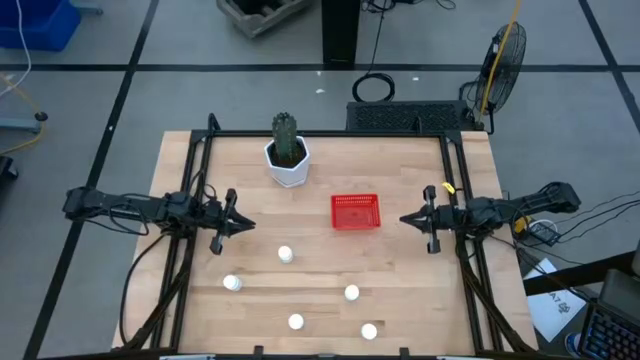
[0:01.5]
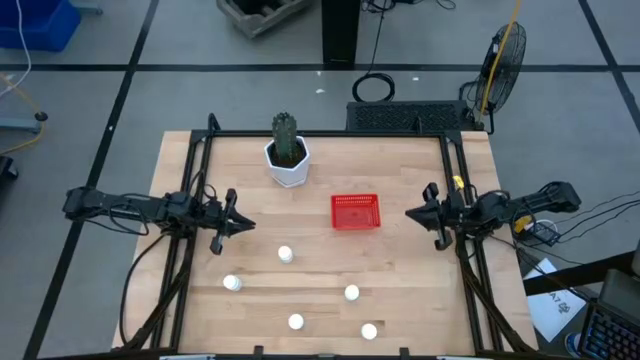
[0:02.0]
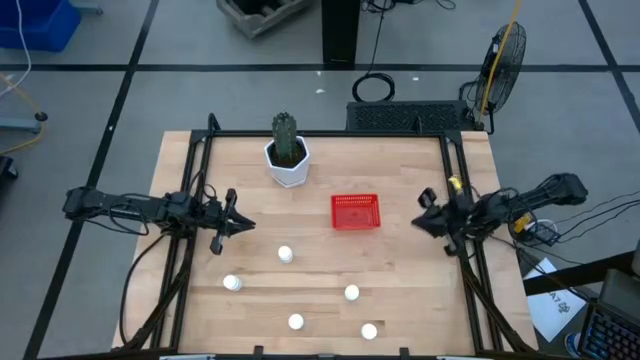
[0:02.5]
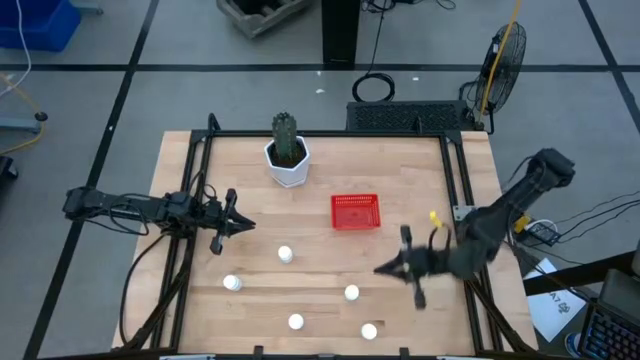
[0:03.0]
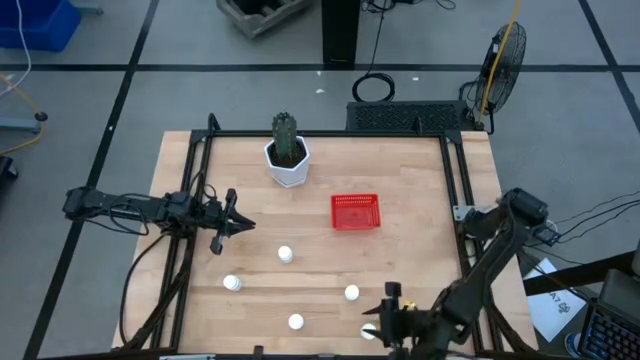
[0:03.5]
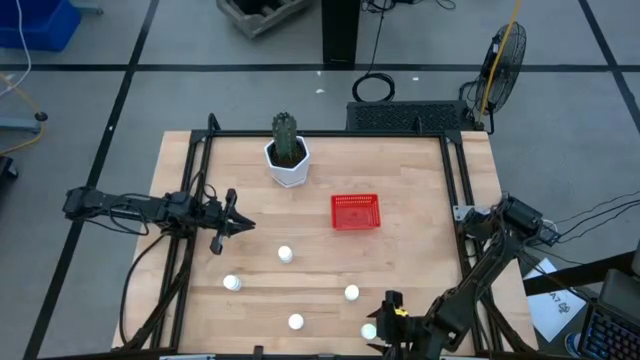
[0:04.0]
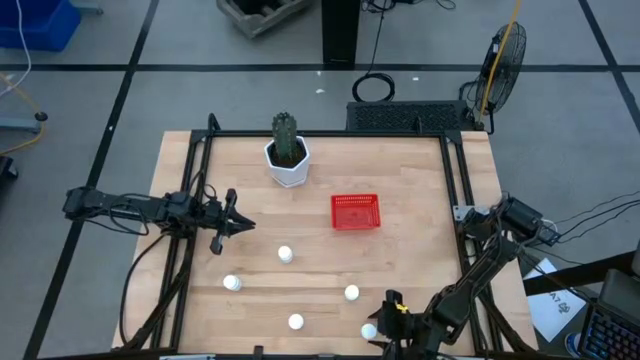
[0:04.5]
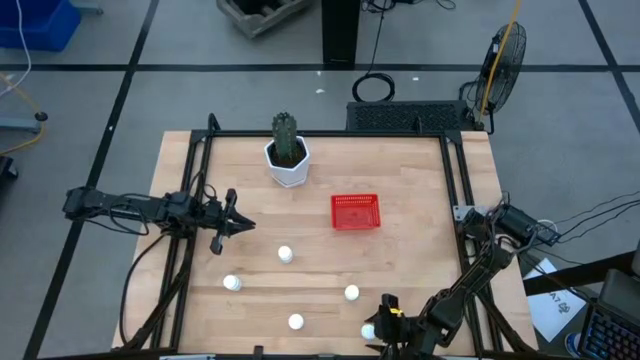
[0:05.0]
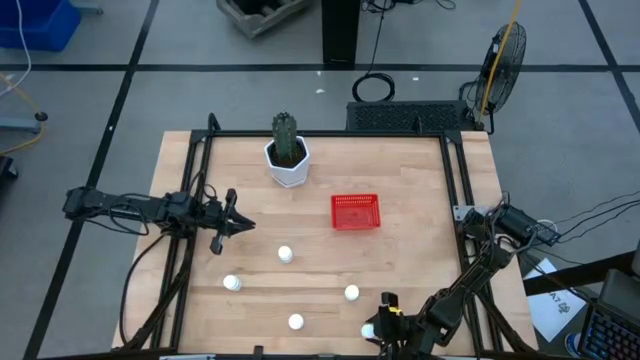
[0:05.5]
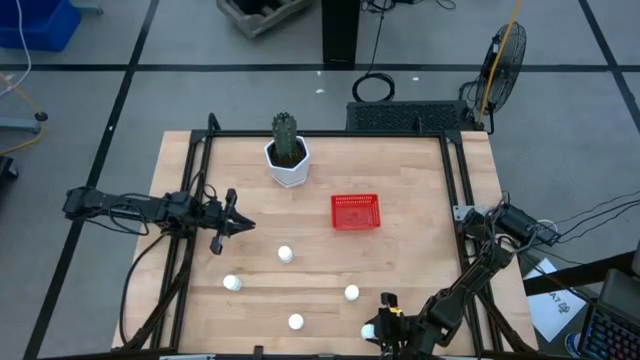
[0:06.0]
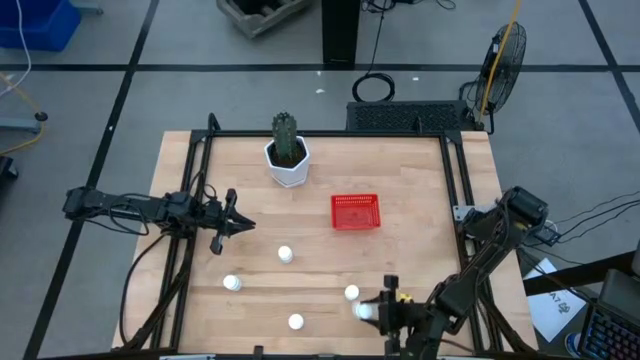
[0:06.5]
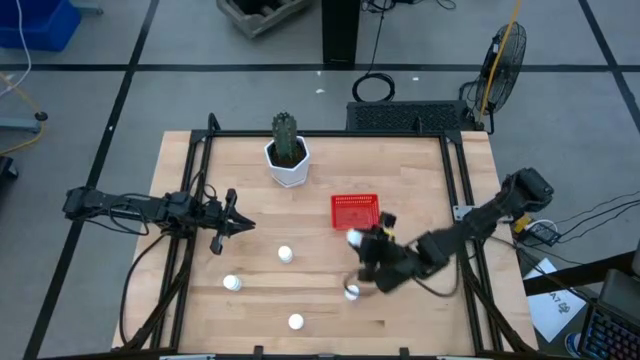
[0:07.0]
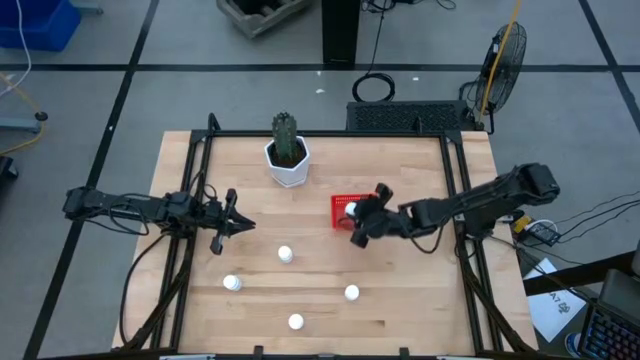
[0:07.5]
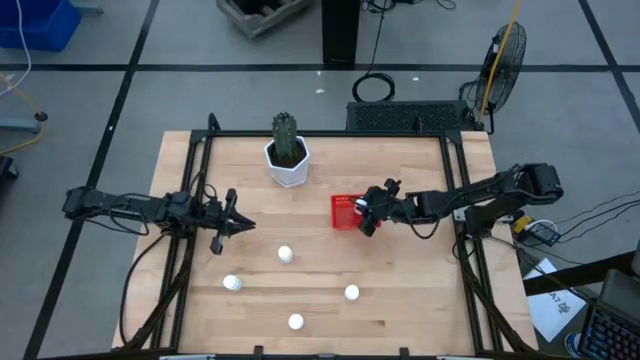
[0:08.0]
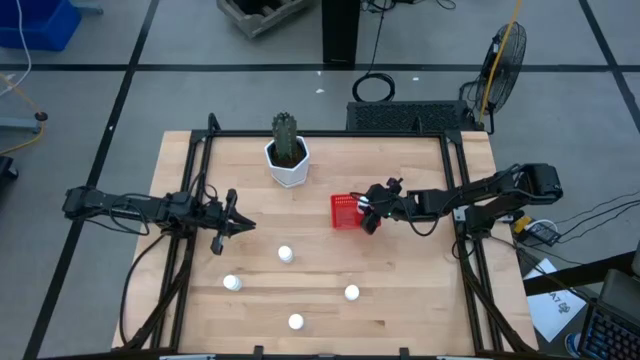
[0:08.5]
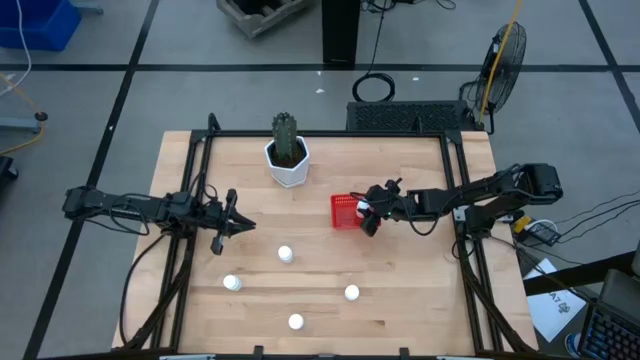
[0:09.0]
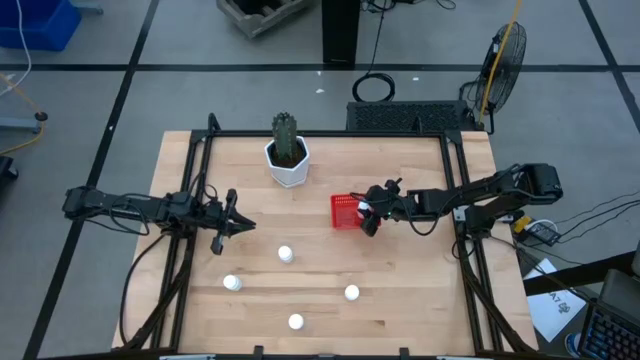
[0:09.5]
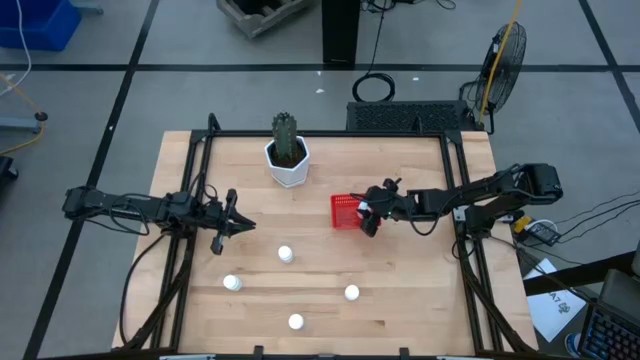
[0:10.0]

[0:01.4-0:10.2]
Task: Pick and place pill bottles into a basket
Put the white pill bottle into the red bin

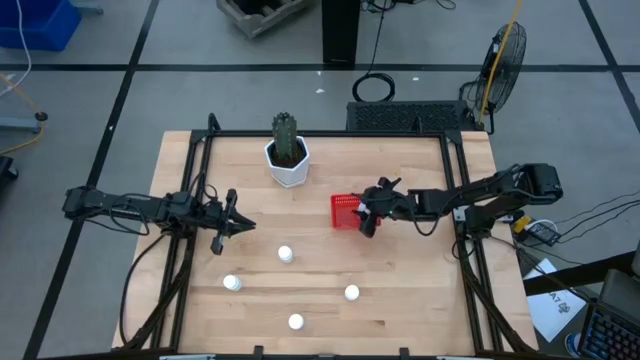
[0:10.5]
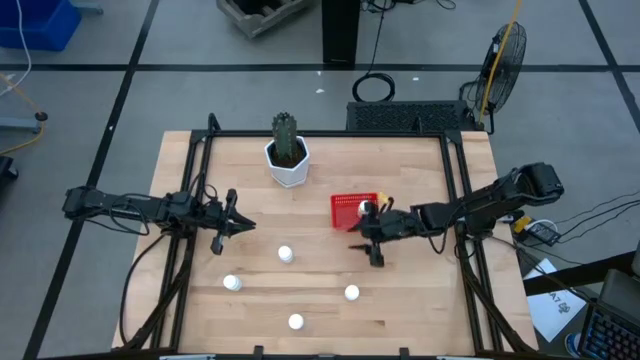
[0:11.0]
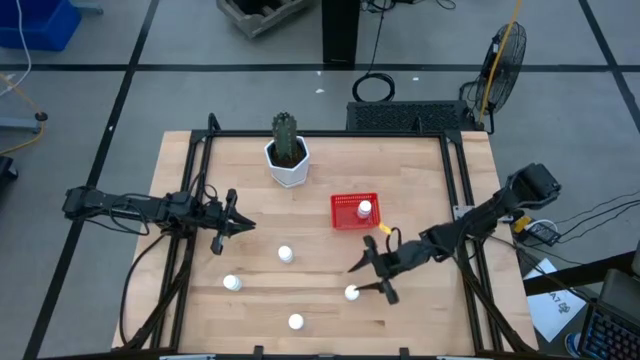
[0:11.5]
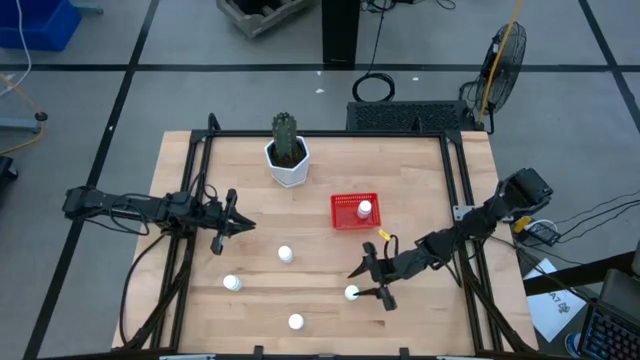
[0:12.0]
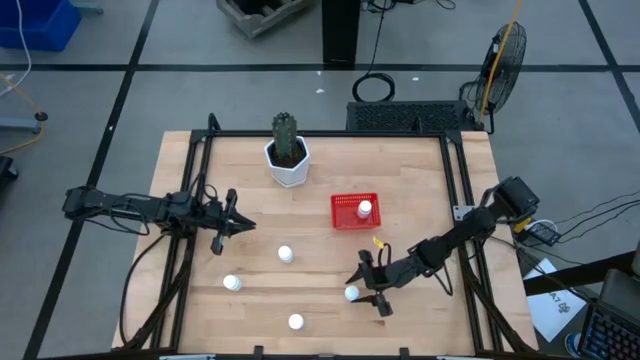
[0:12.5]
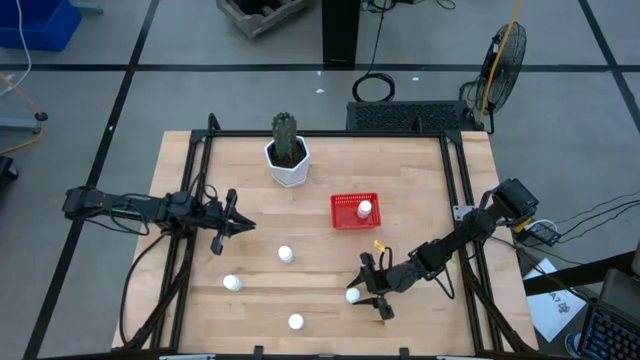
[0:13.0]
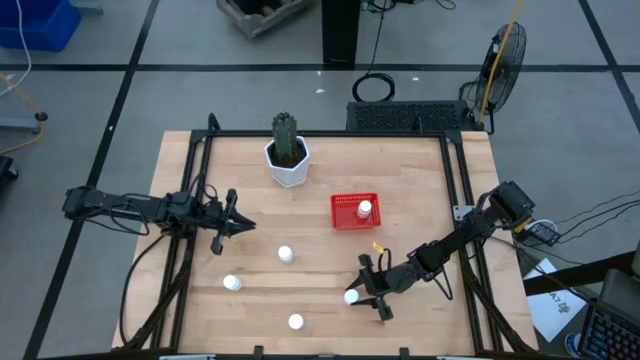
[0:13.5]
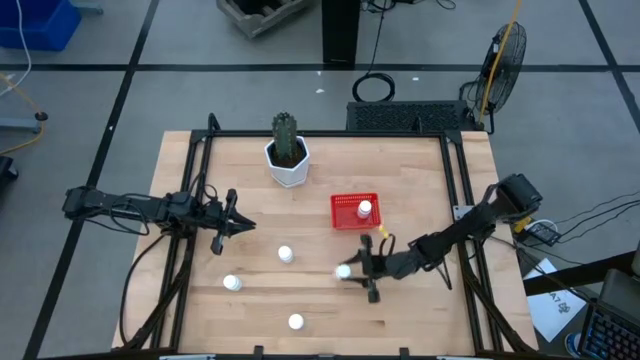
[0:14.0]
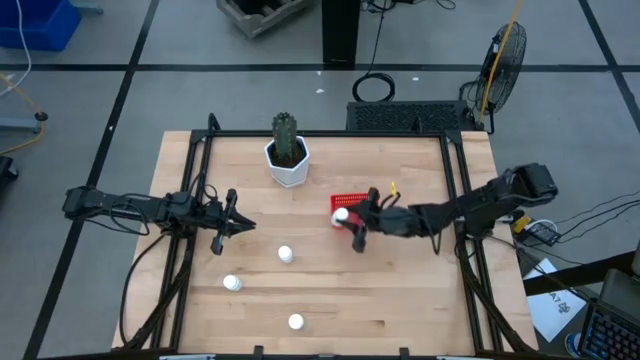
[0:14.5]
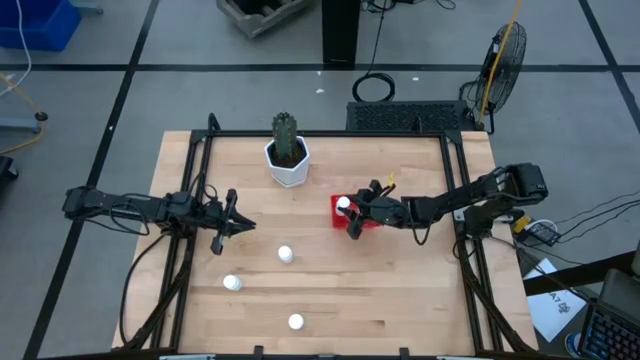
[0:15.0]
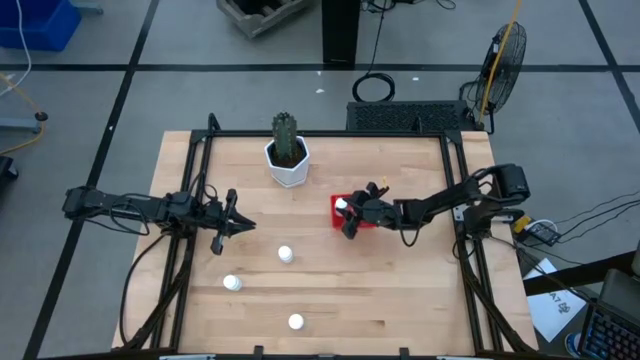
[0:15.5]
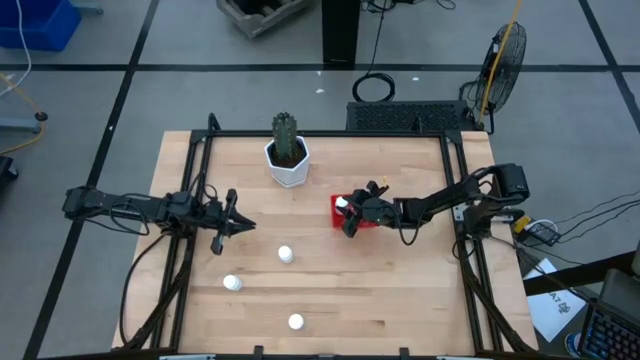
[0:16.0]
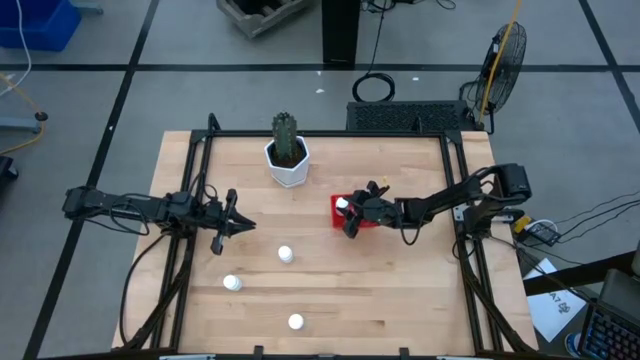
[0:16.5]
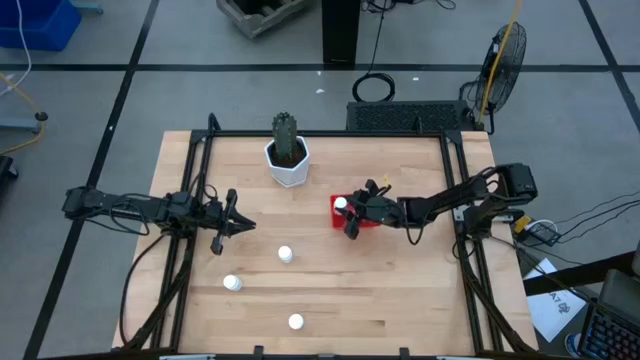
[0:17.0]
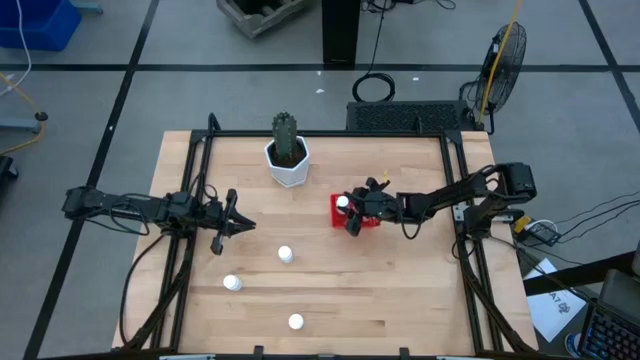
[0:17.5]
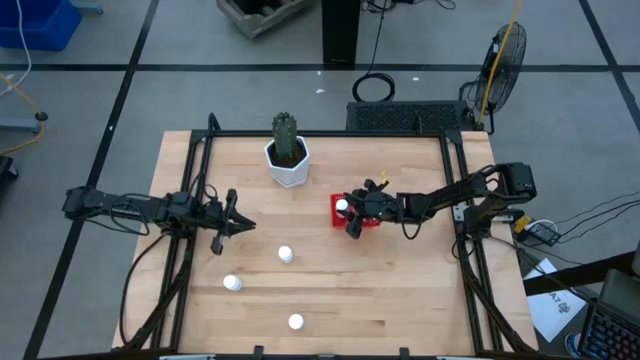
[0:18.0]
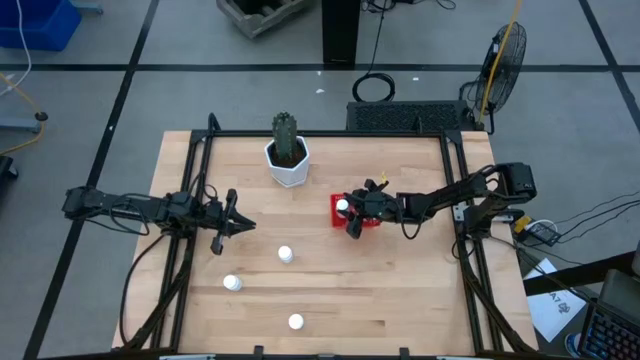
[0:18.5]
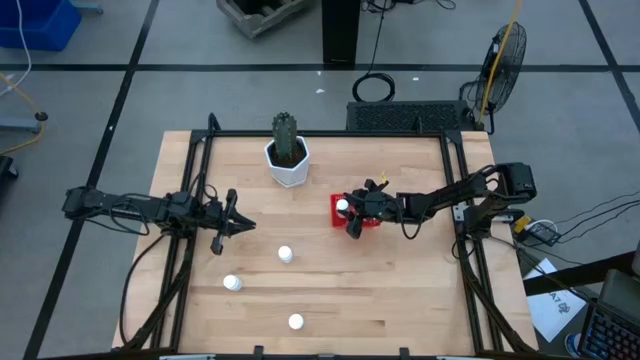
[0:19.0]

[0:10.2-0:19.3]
Put the white pill bottle into the red bin

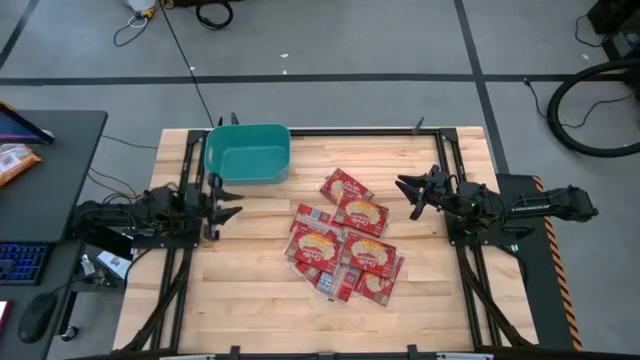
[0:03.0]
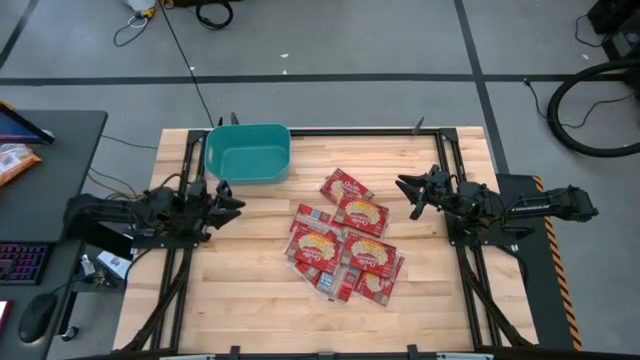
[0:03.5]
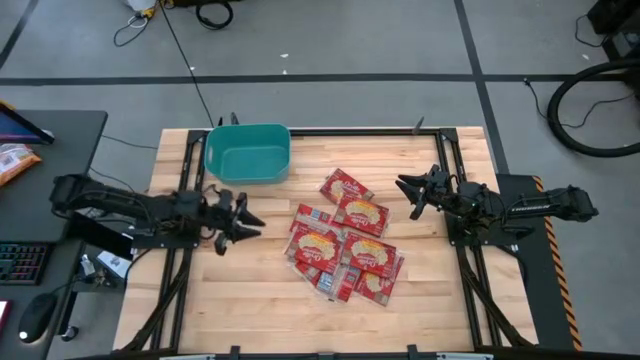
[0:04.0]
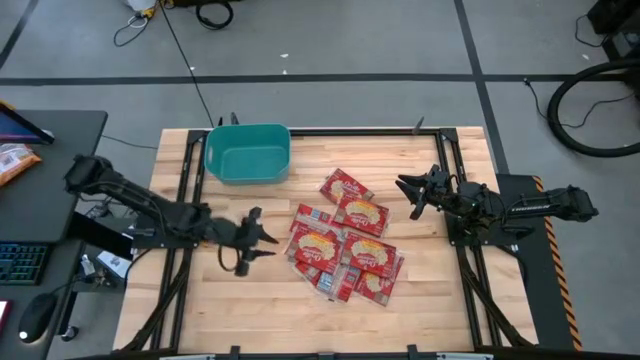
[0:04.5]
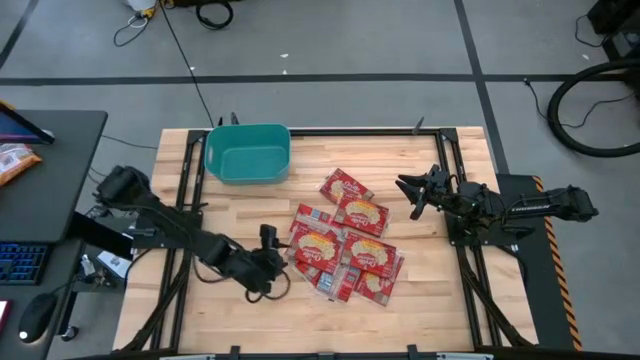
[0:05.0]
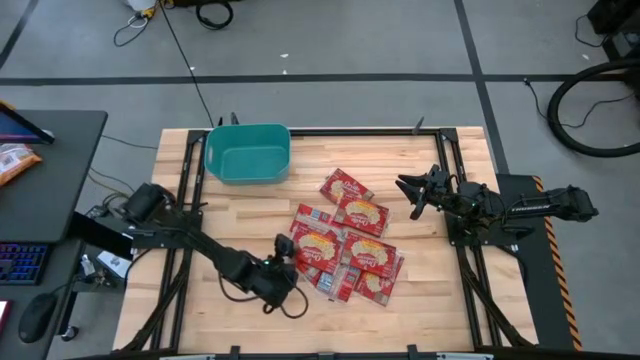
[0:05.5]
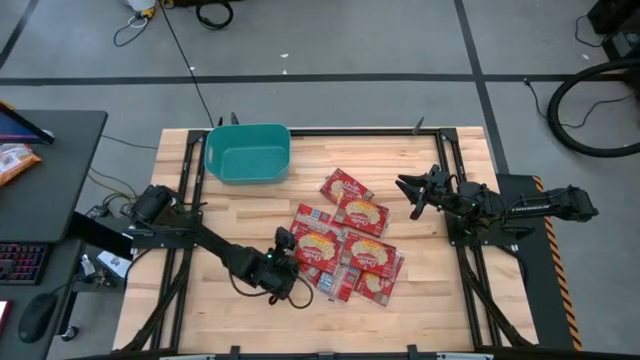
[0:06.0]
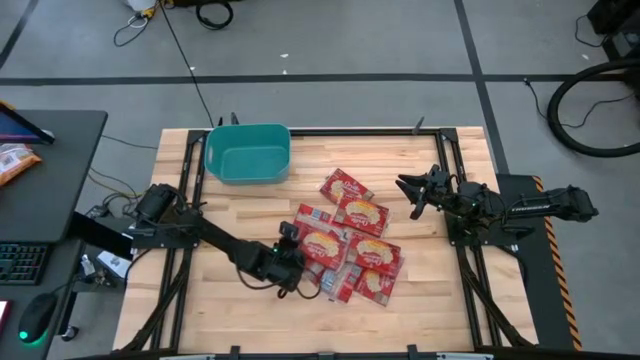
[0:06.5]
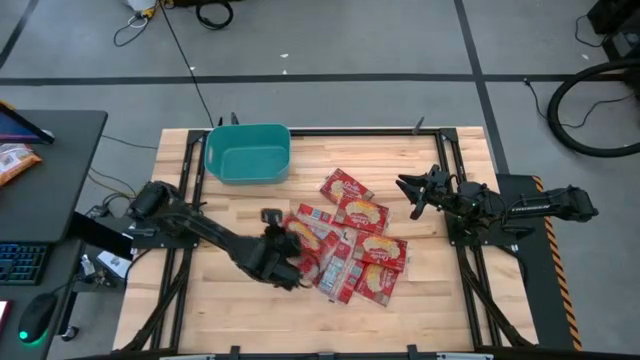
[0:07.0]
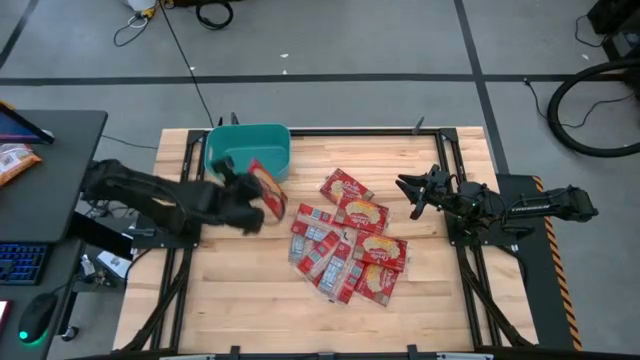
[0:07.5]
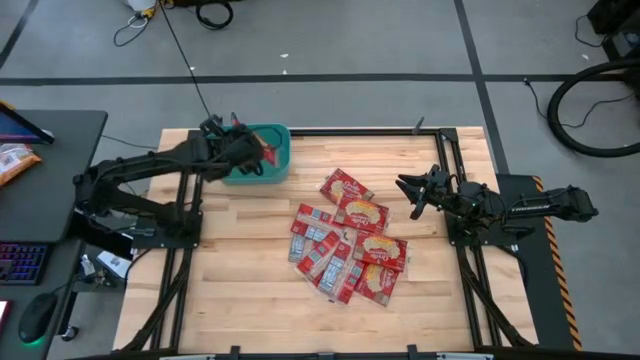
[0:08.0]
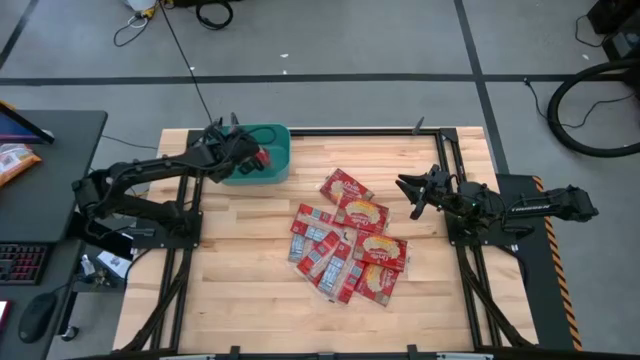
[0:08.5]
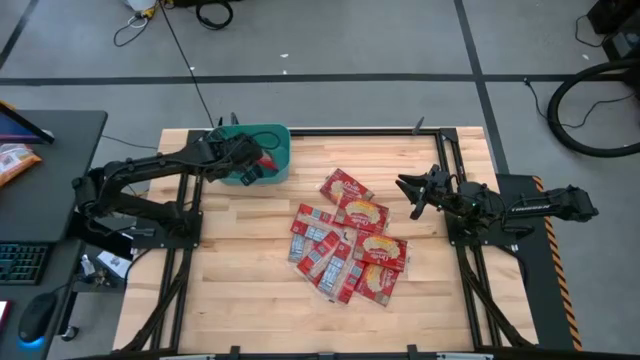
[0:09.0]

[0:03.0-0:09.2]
Task: Sort popcorn bags into baskets
Put the red popcorn bag into the blue bin
